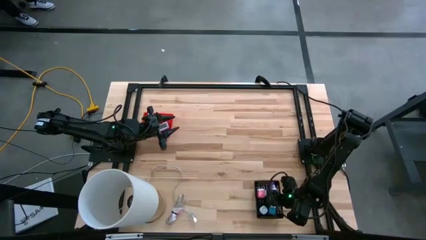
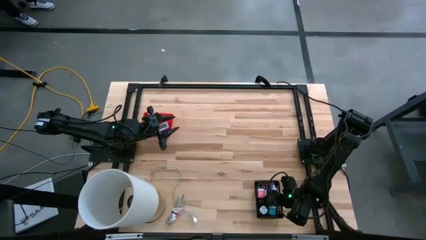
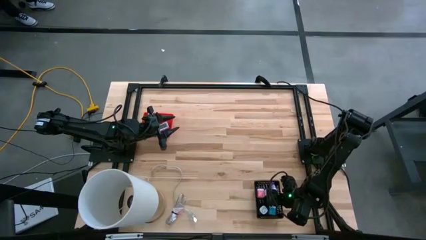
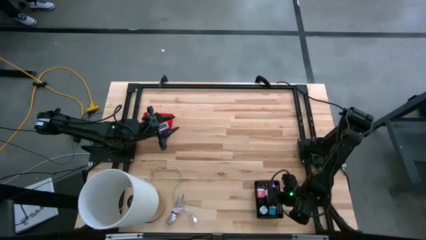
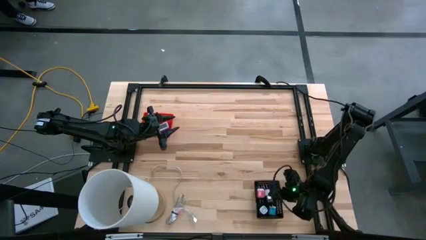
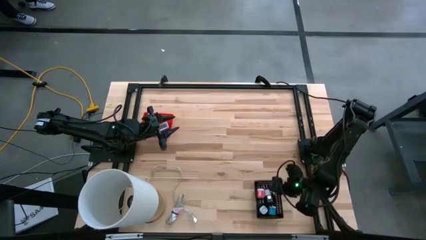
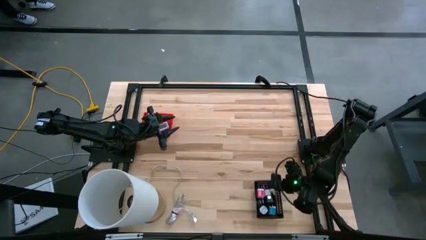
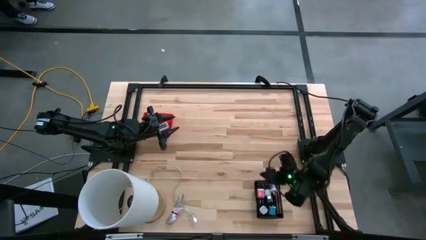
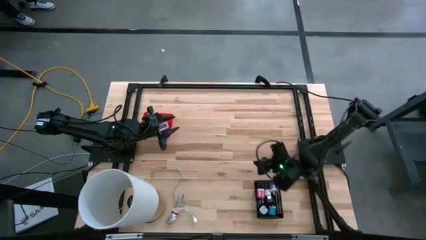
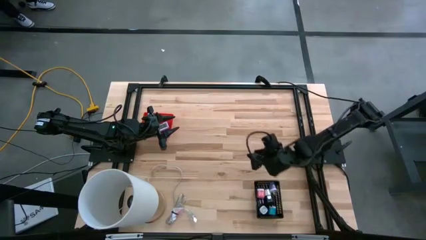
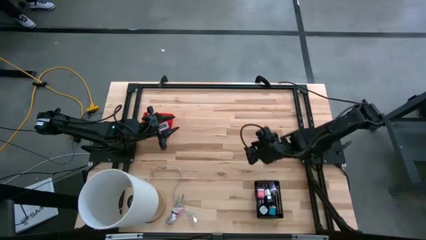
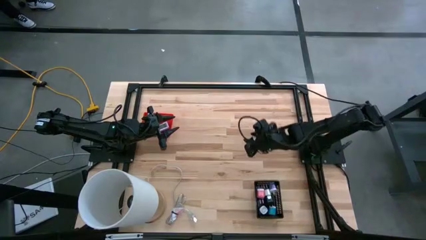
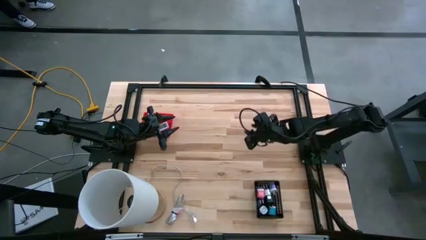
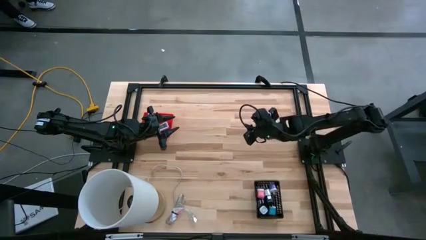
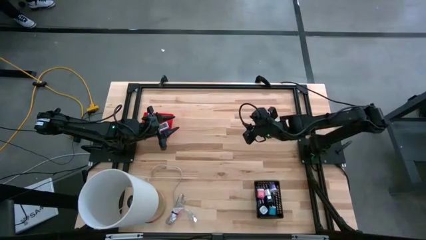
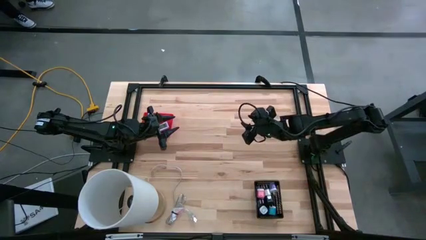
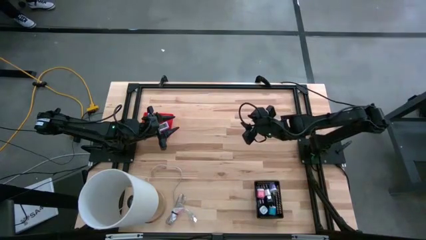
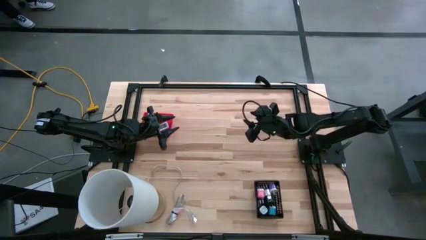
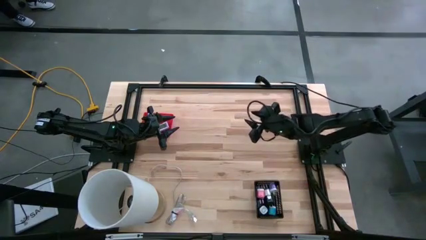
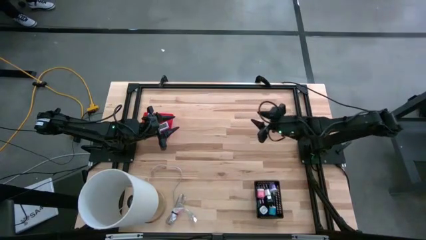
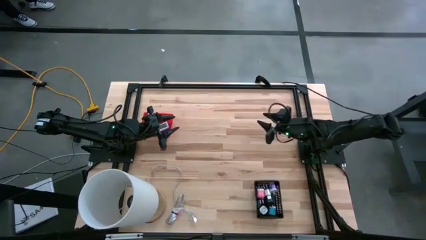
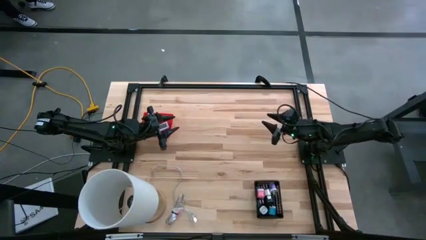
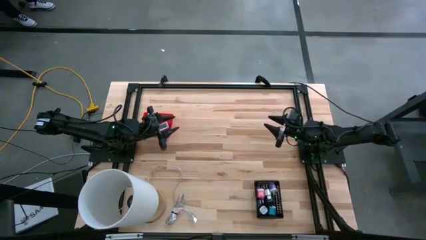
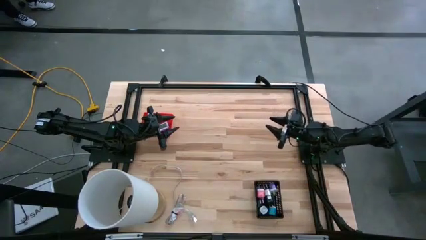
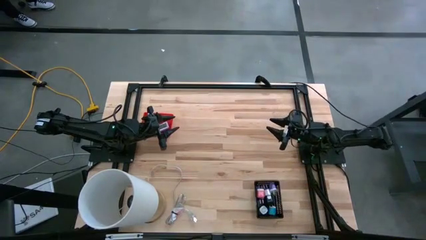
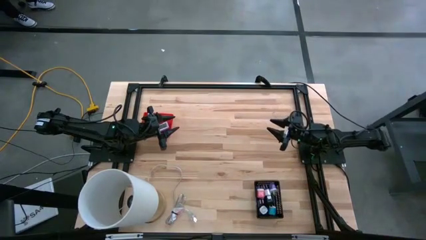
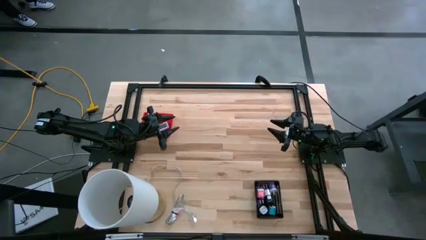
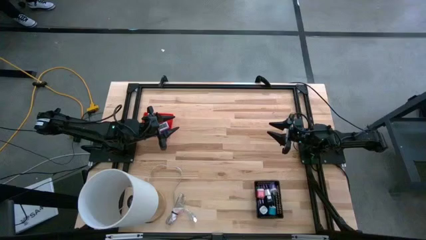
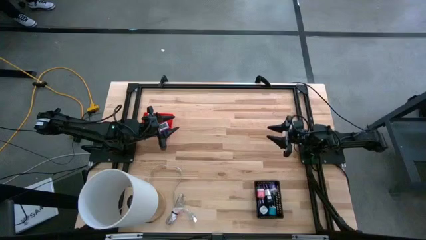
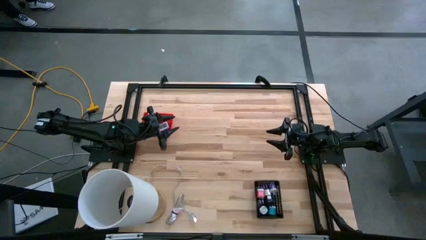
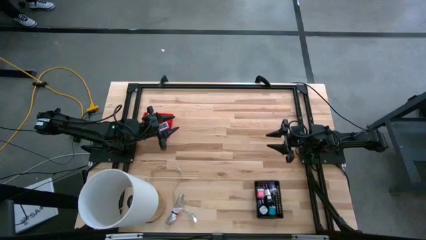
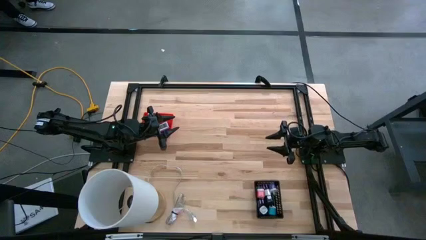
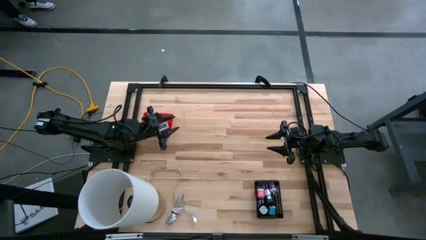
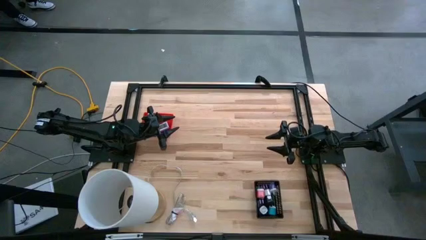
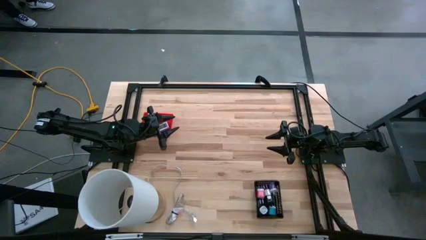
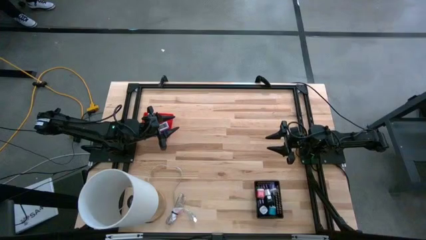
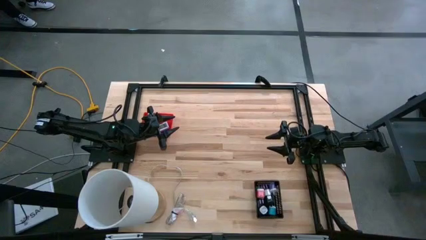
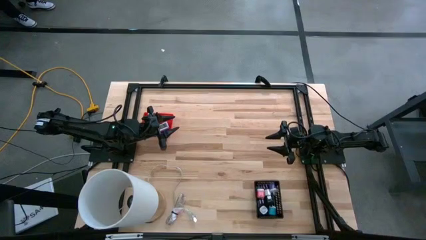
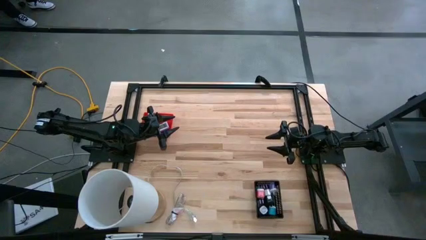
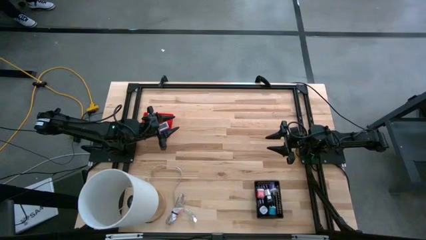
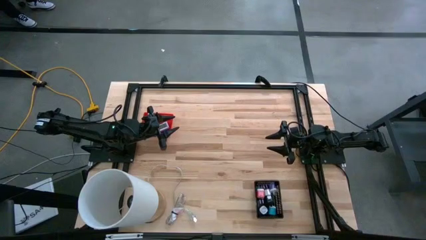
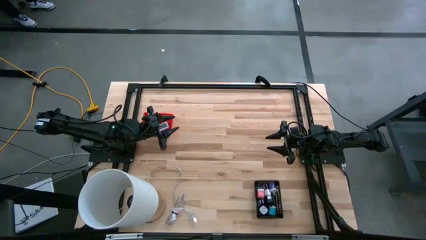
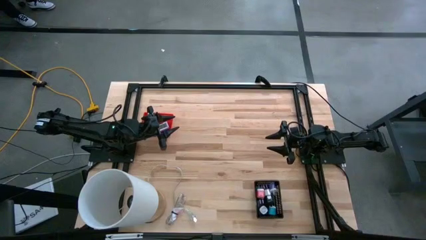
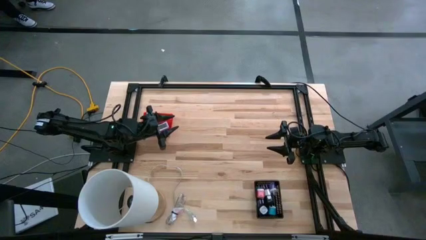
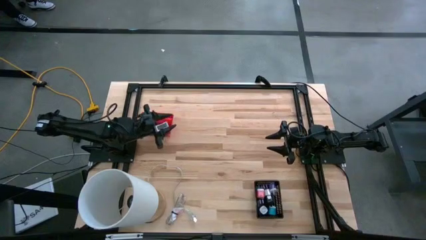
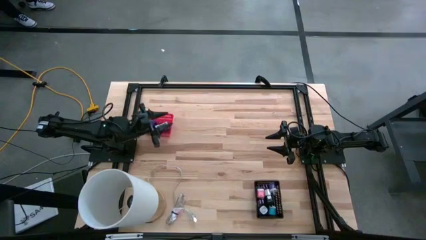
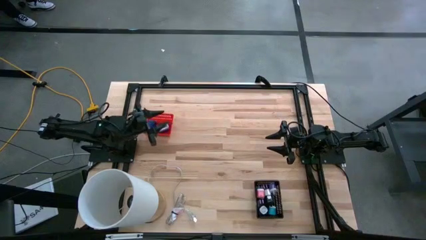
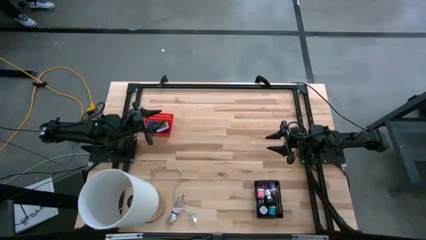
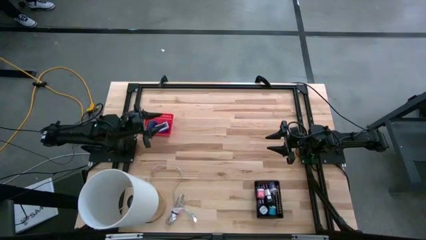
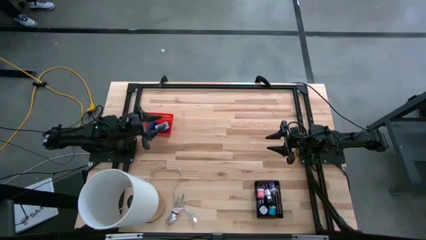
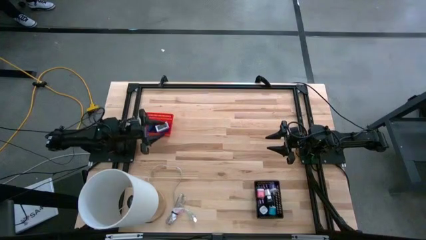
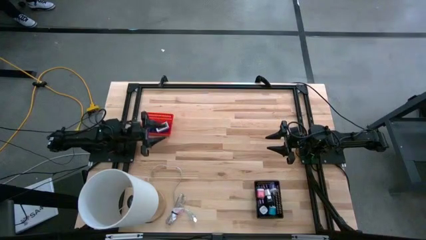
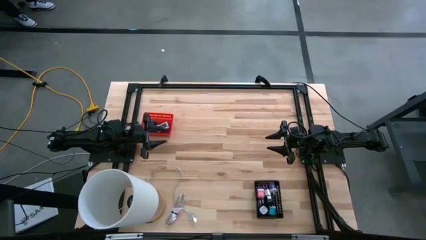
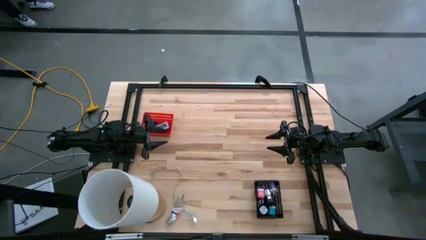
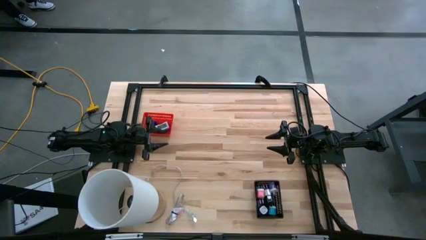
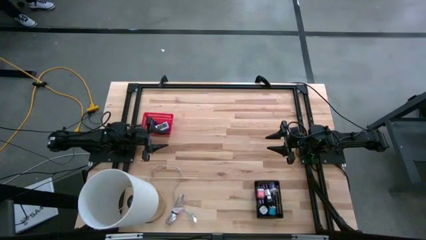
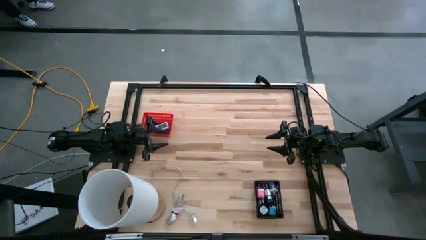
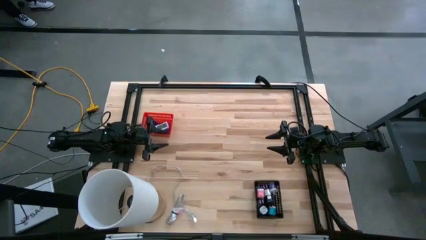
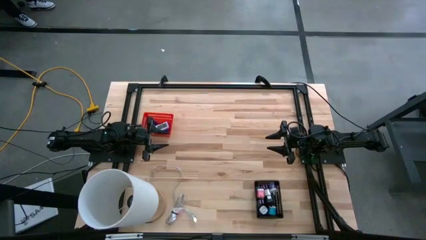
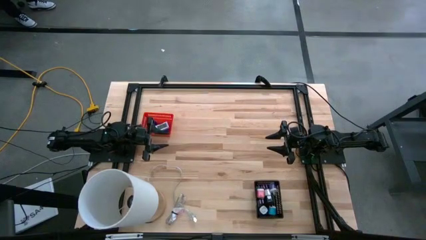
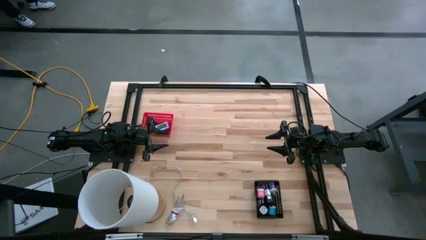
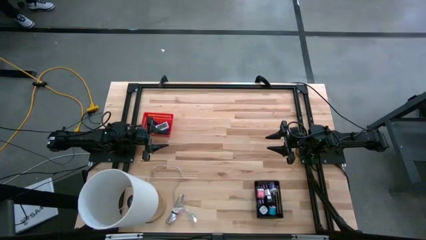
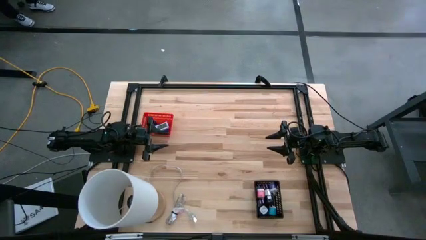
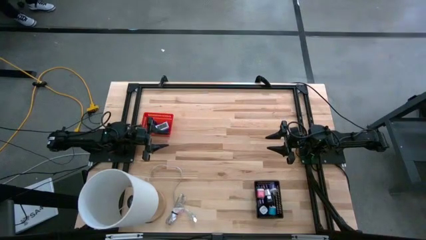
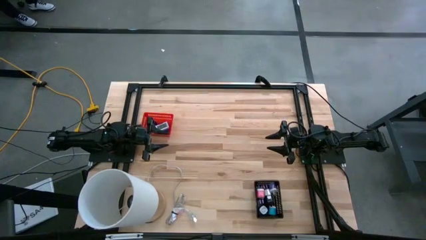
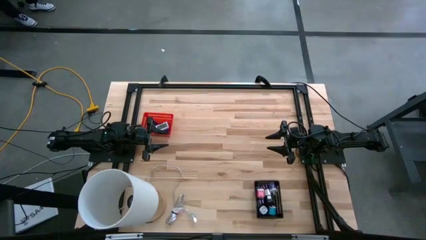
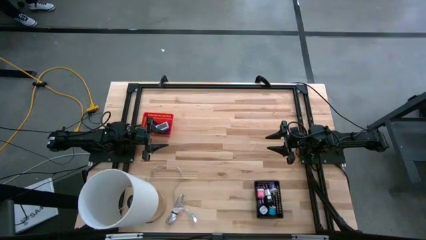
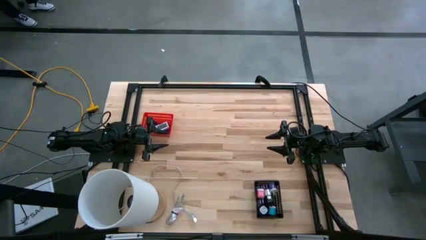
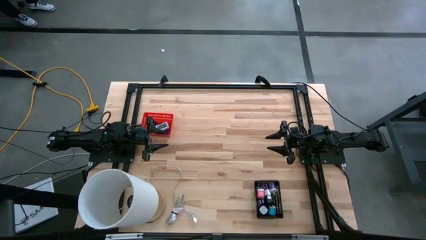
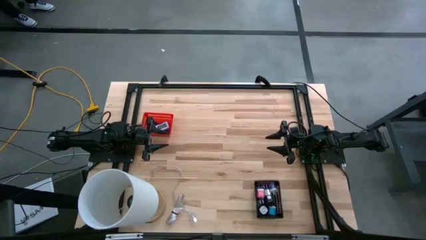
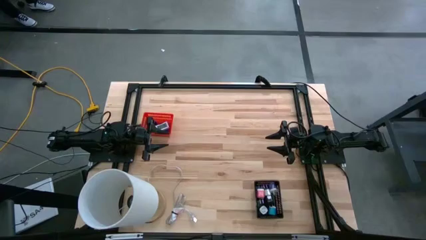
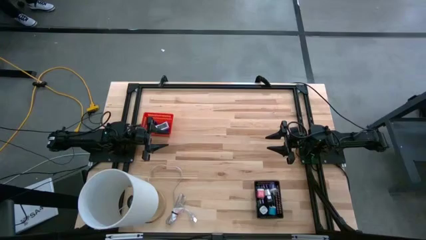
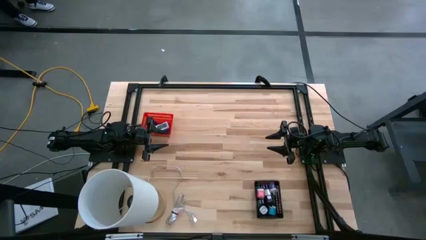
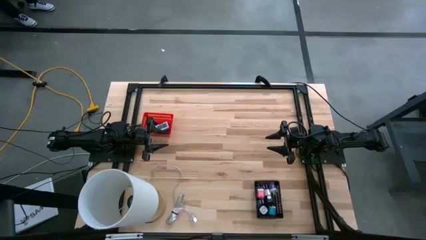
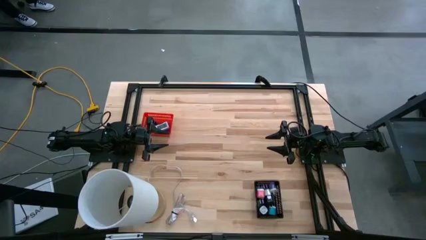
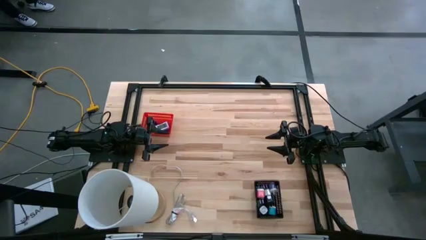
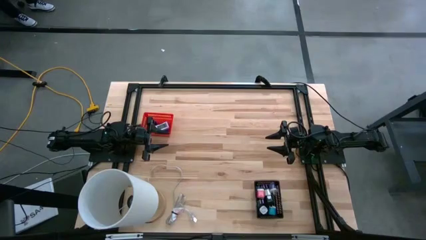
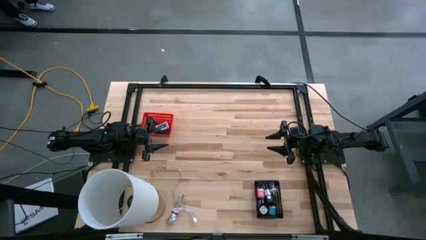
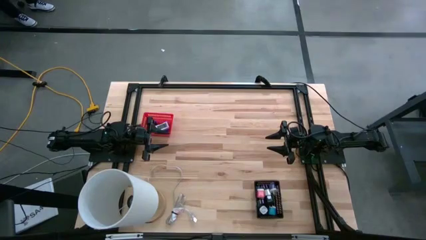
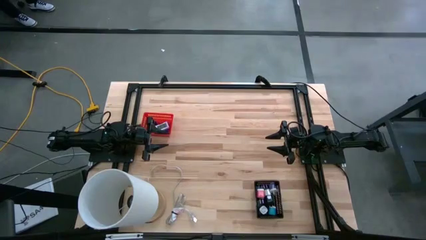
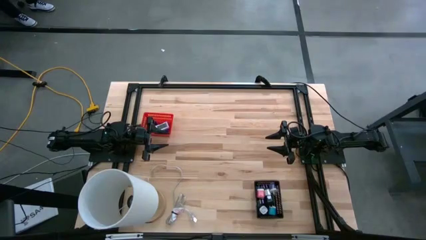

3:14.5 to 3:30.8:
Task: Pick & Place Office items
Return to Home Position
